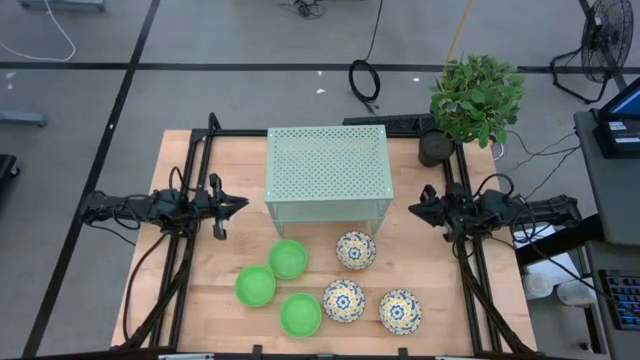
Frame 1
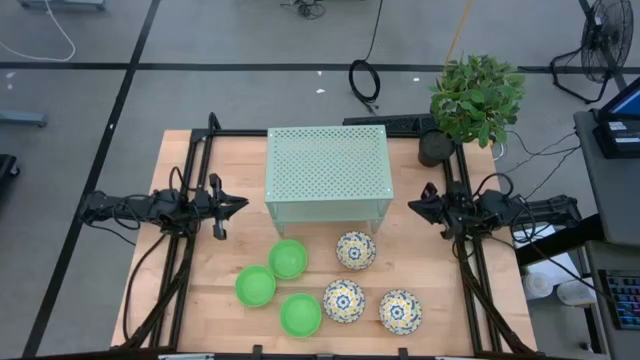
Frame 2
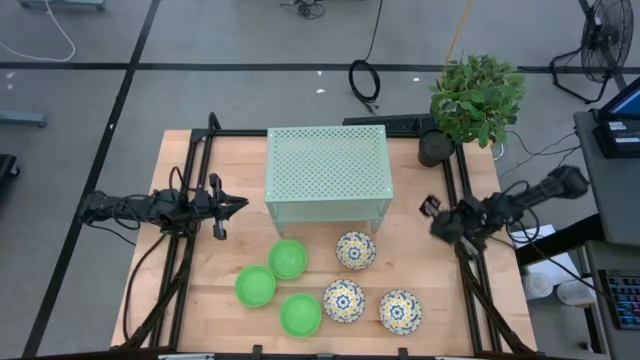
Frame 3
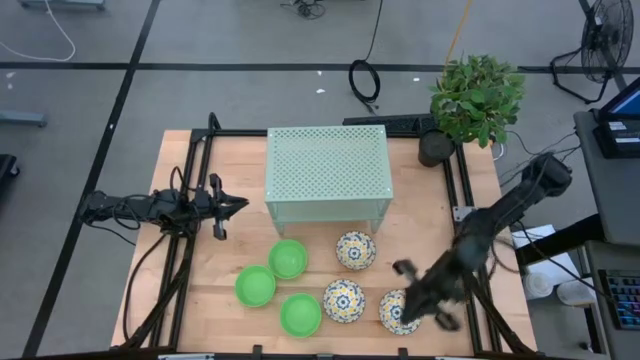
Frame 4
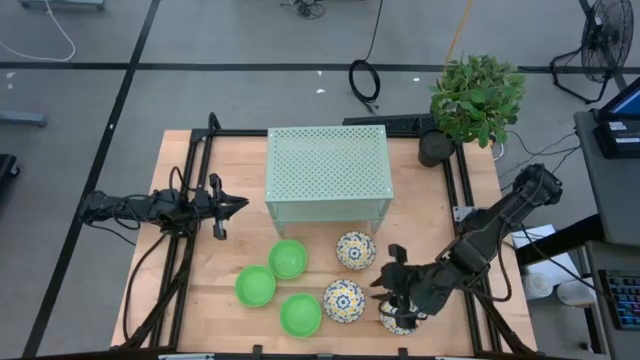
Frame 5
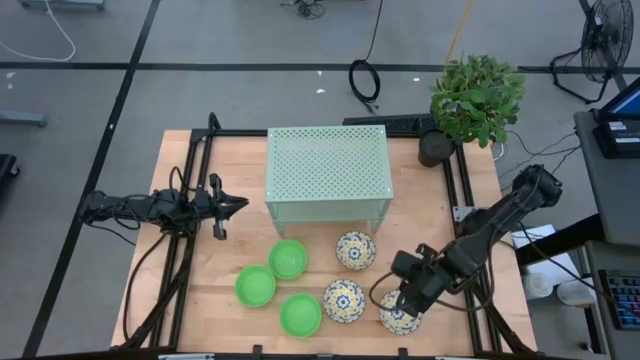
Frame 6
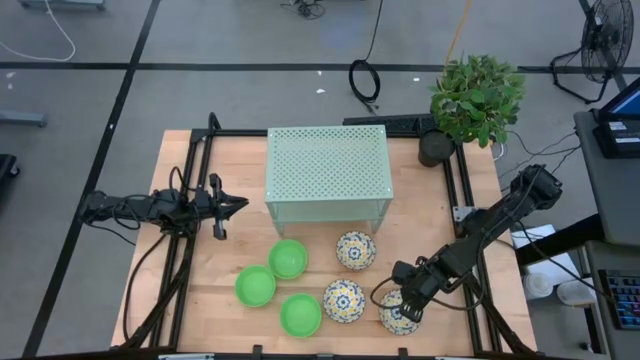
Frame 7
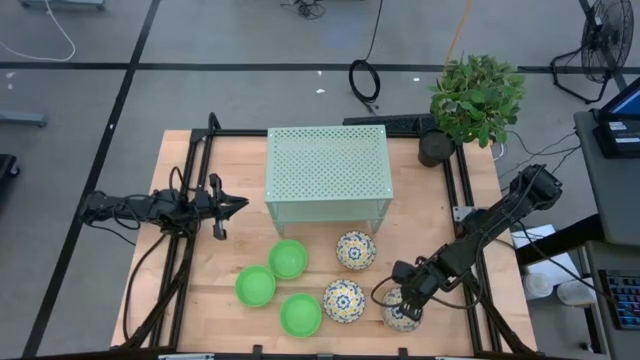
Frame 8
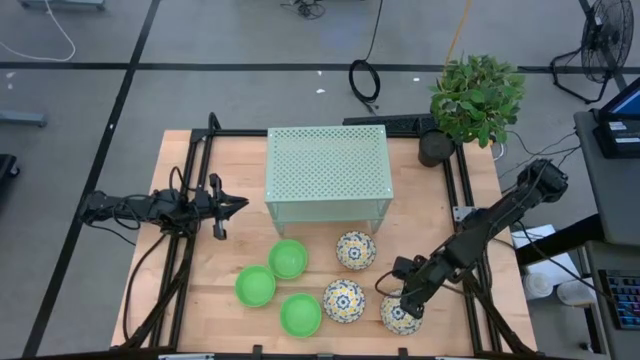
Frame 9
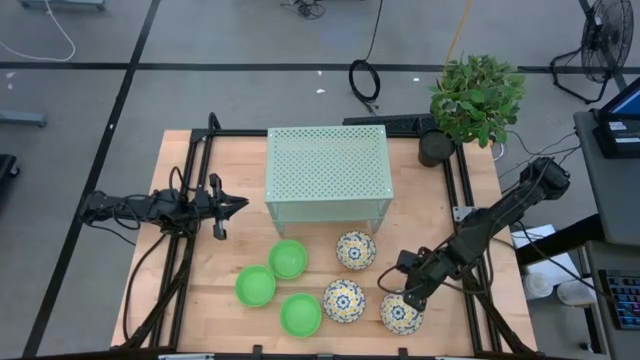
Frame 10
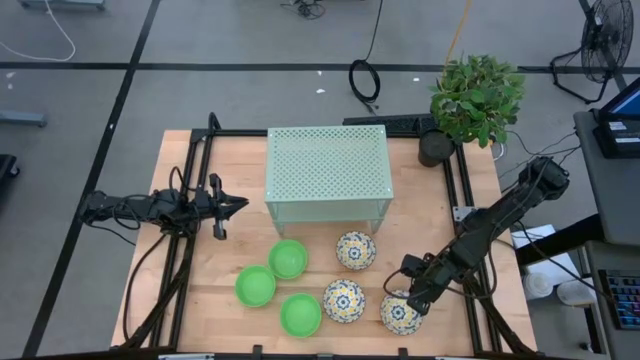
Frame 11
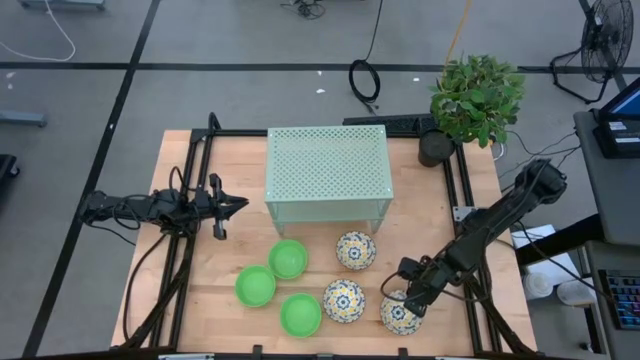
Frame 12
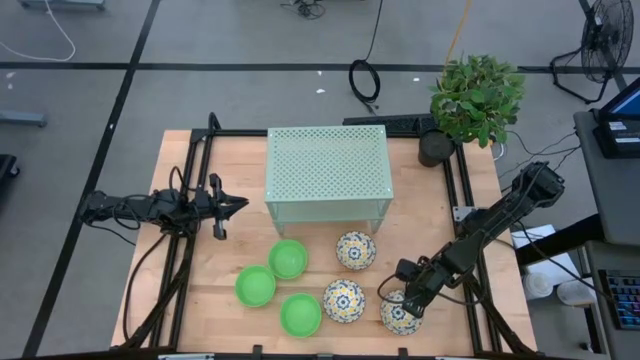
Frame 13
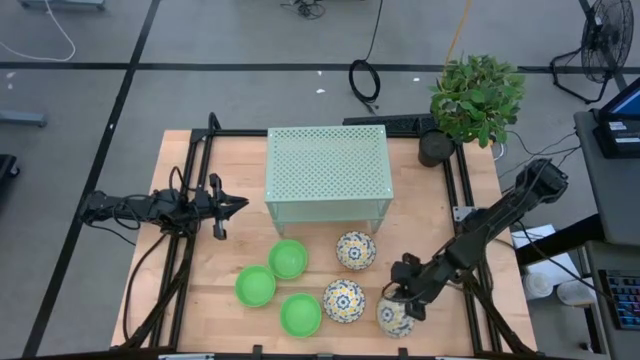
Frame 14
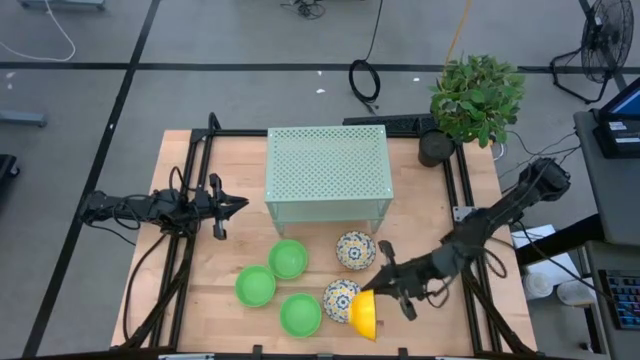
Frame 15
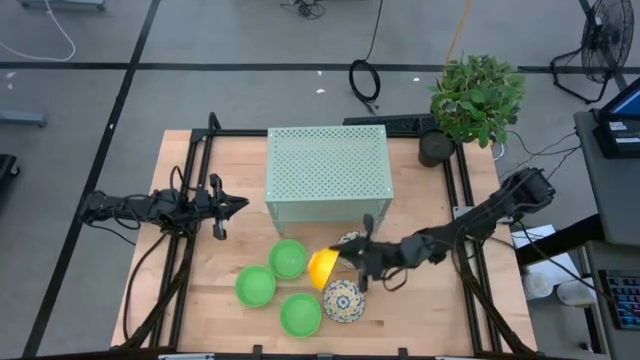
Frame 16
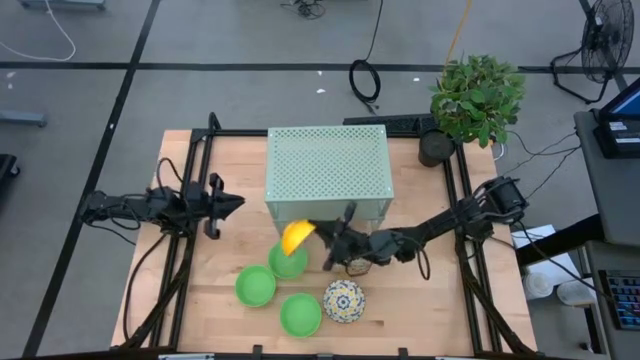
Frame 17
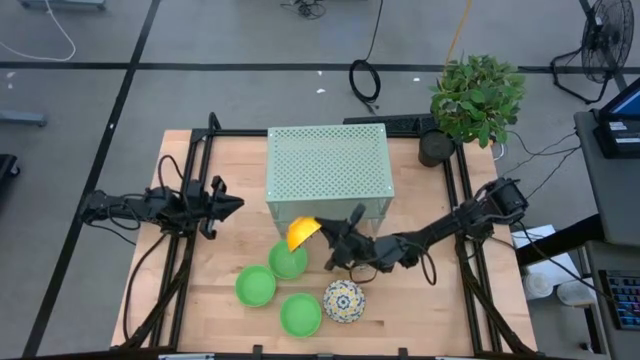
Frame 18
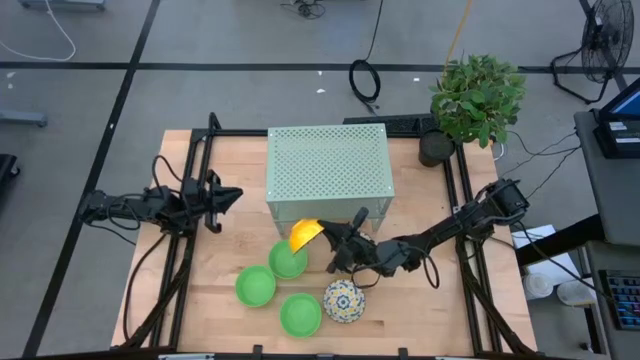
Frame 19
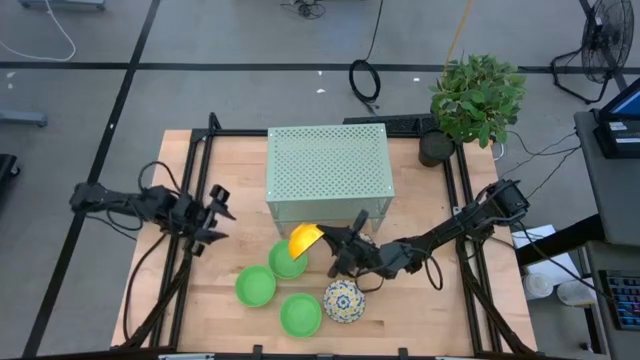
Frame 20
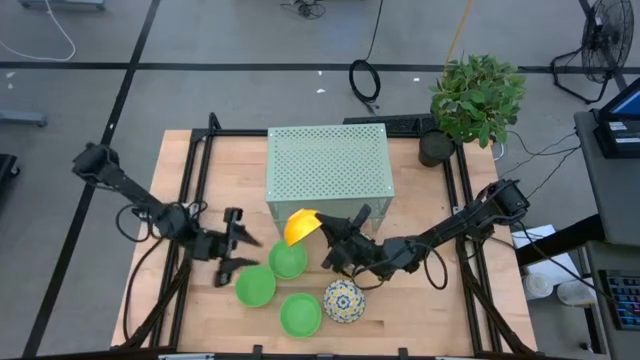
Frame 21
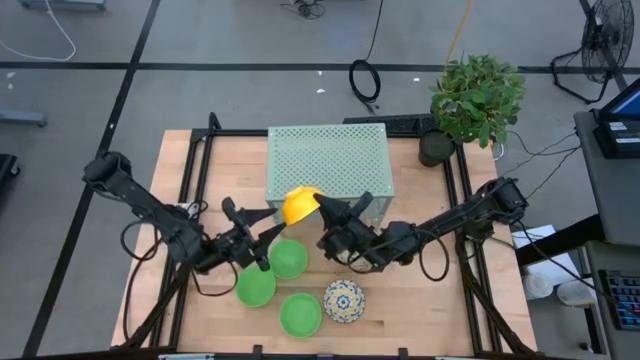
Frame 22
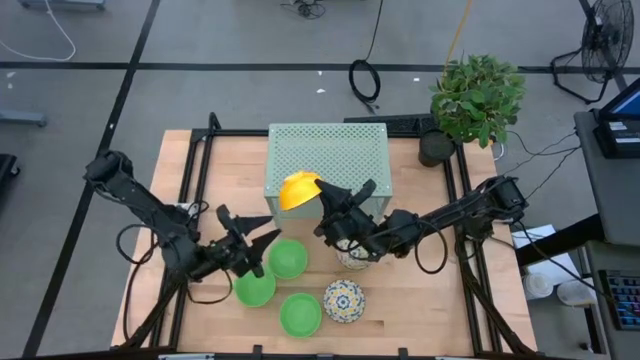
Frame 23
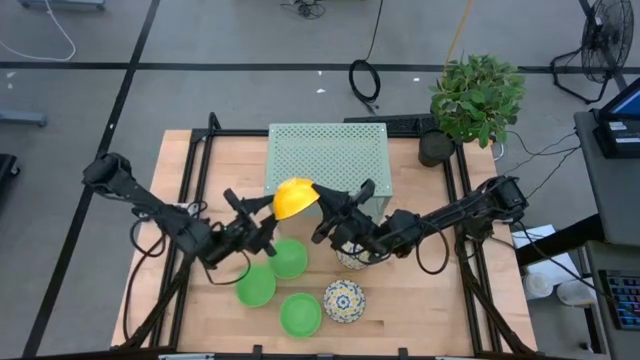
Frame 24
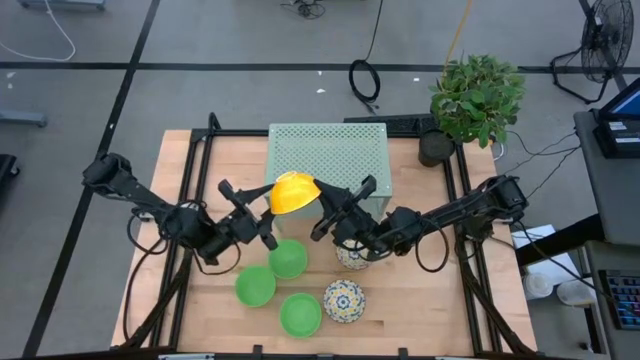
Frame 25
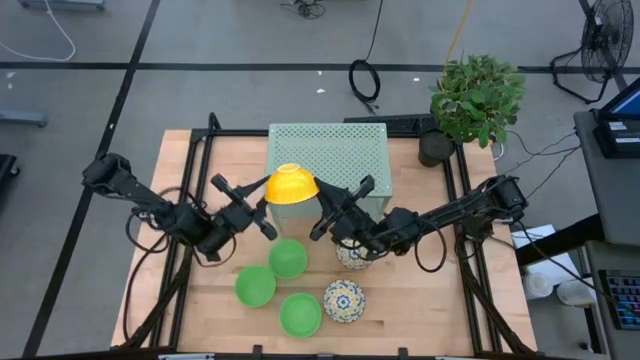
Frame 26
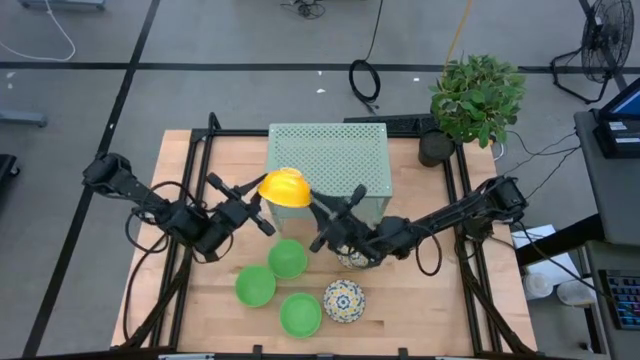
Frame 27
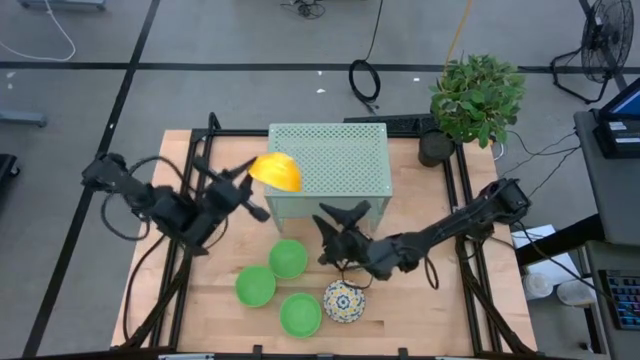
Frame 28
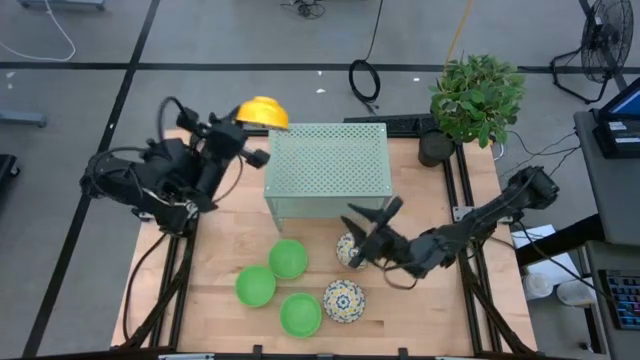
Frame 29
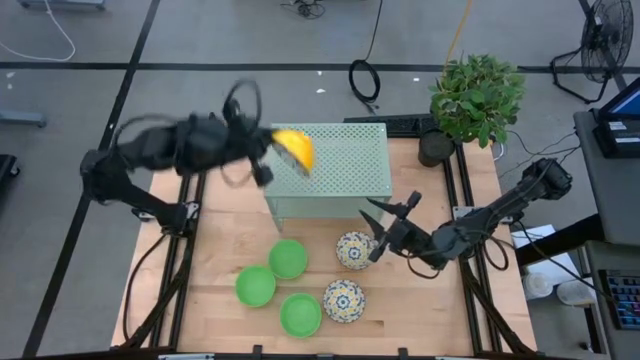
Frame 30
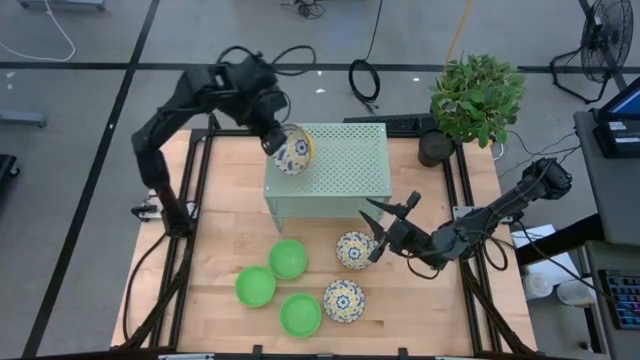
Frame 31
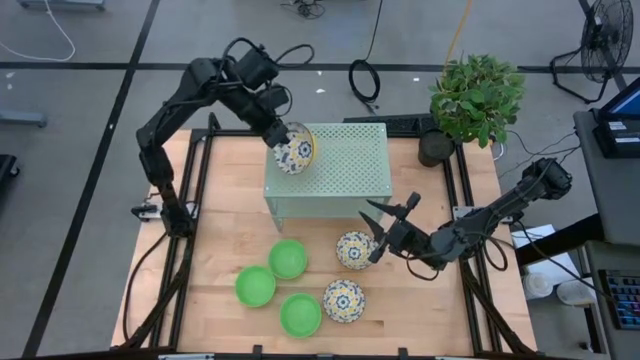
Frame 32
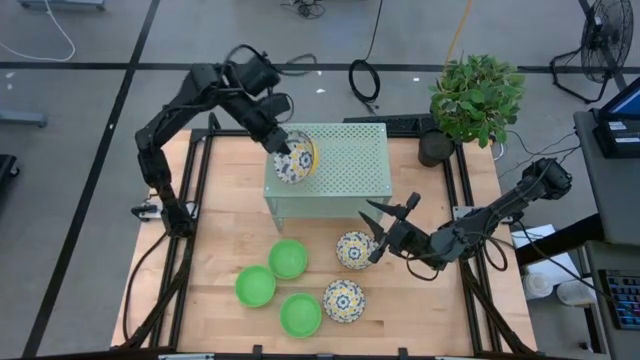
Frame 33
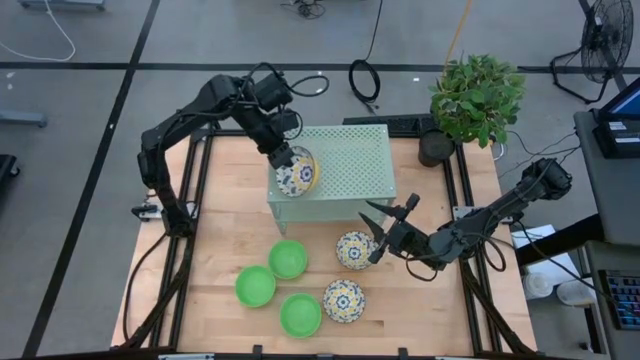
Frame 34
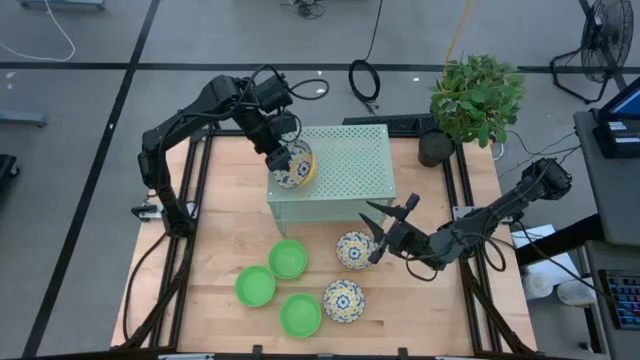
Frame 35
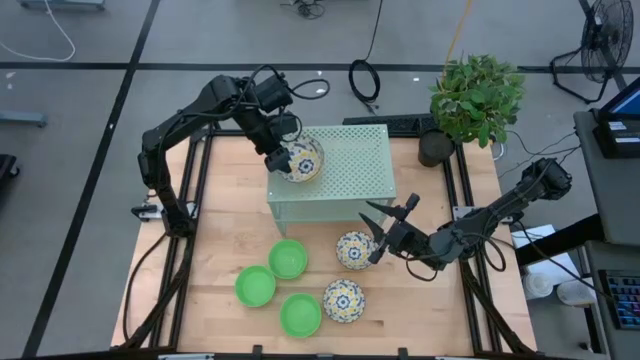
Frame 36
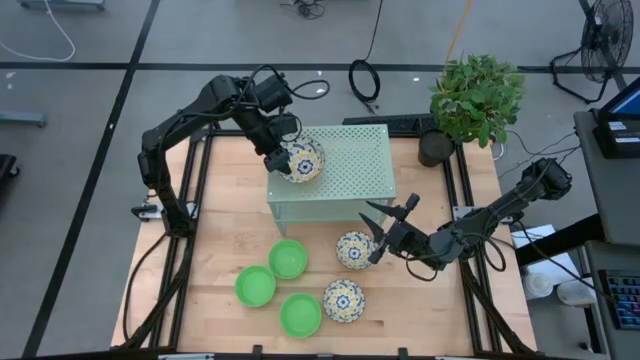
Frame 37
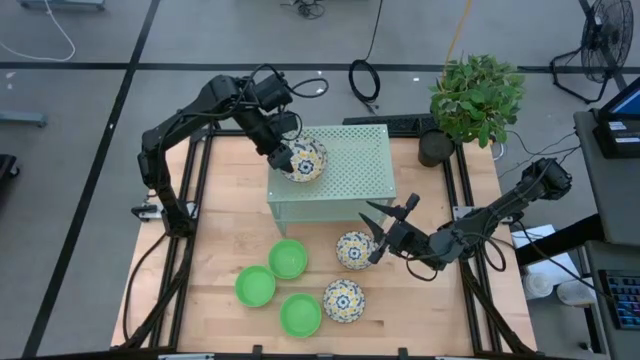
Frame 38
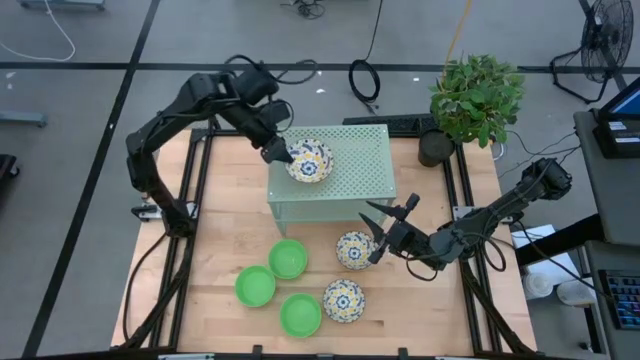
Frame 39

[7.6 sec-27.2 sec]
Task: Pick & Place Mini bowls
Put the bottom right yellow patterned bowl on the shelf
